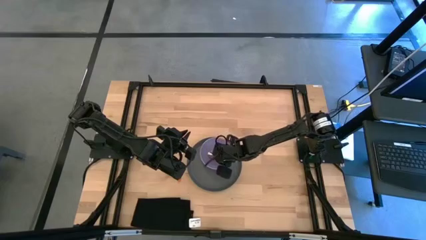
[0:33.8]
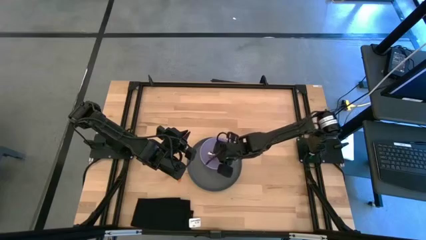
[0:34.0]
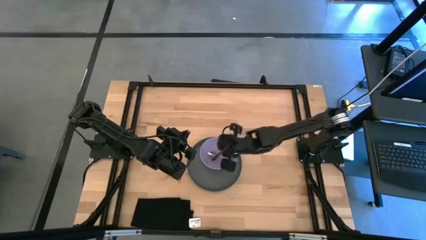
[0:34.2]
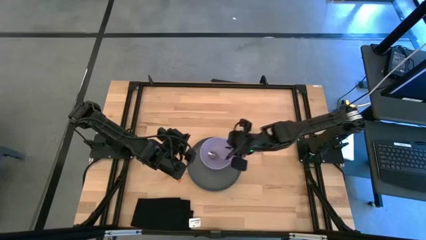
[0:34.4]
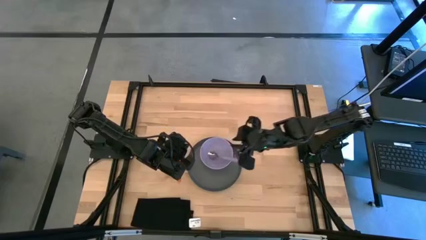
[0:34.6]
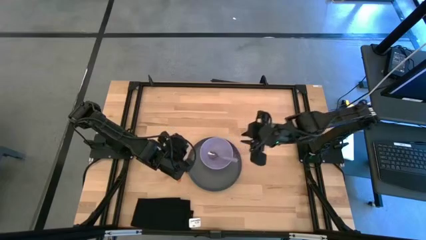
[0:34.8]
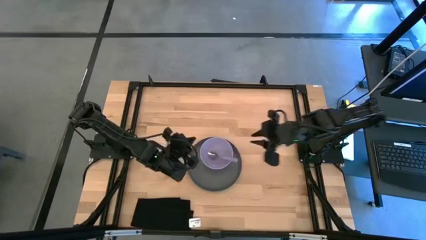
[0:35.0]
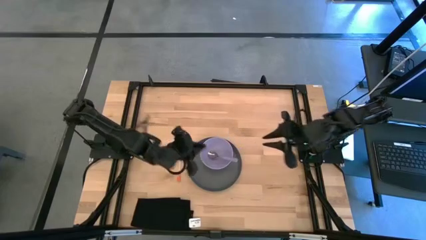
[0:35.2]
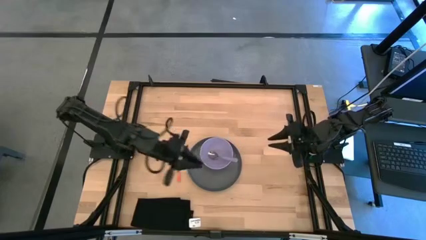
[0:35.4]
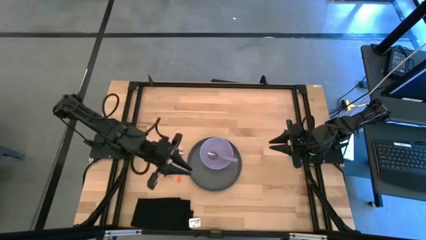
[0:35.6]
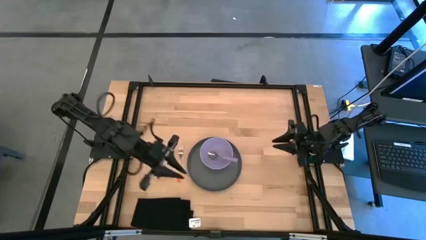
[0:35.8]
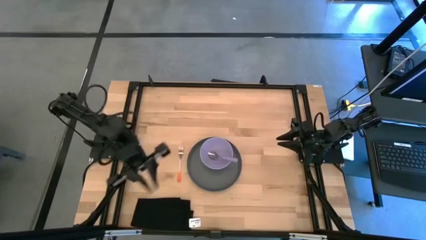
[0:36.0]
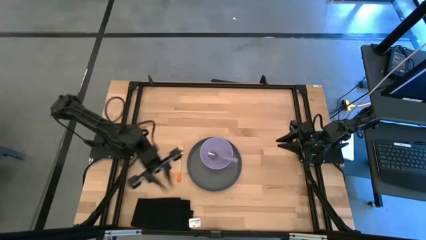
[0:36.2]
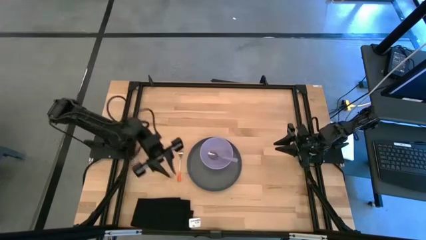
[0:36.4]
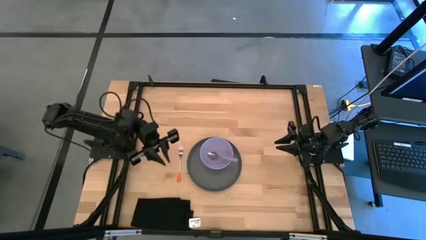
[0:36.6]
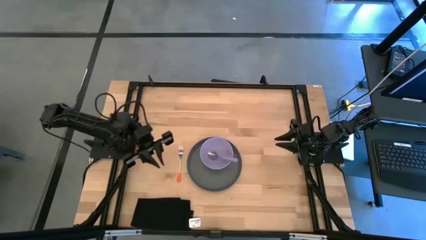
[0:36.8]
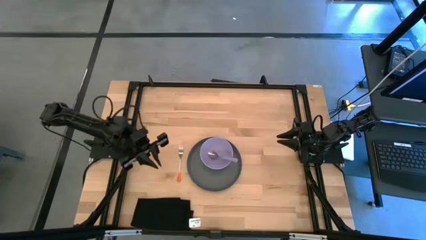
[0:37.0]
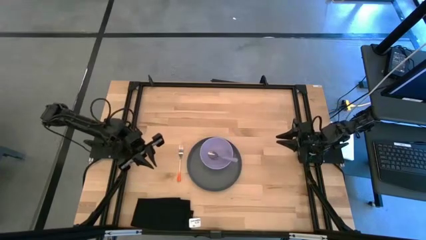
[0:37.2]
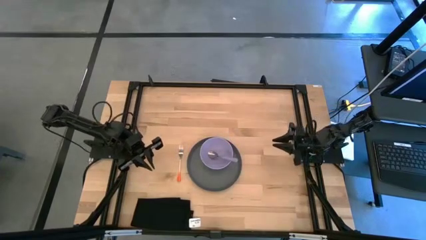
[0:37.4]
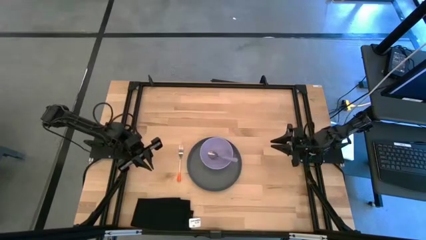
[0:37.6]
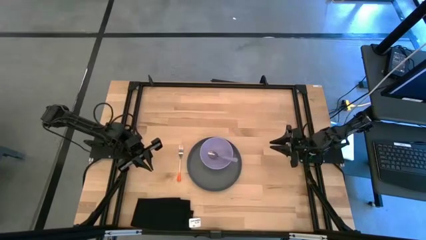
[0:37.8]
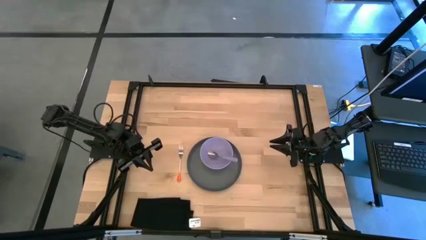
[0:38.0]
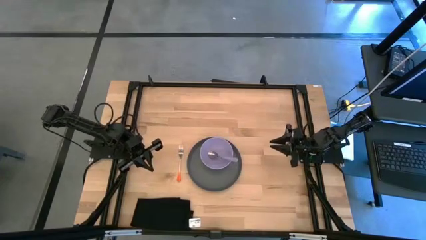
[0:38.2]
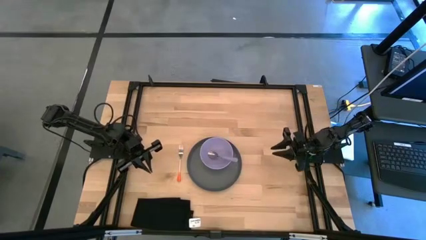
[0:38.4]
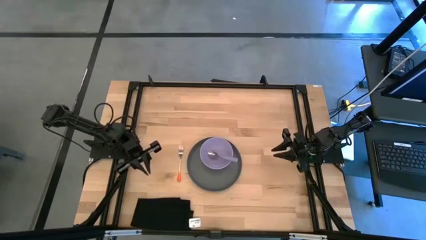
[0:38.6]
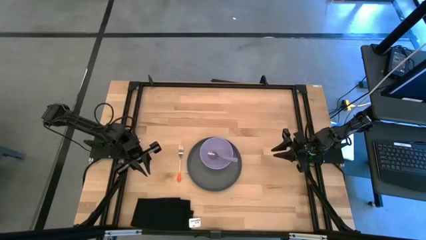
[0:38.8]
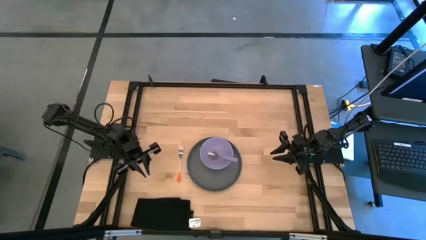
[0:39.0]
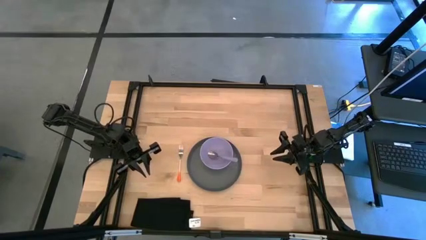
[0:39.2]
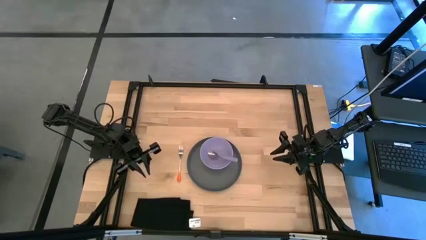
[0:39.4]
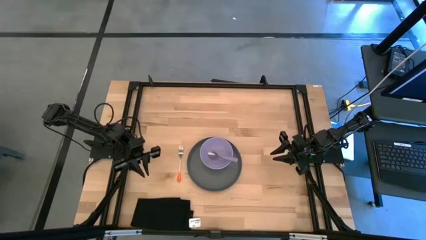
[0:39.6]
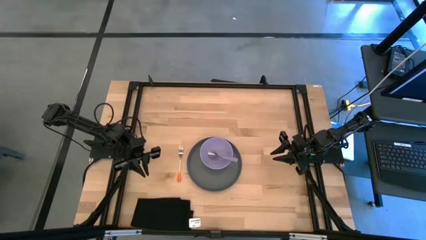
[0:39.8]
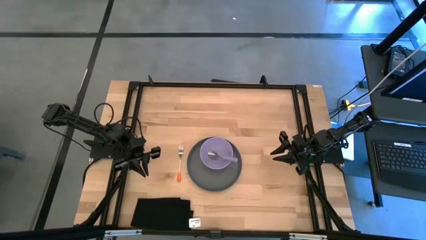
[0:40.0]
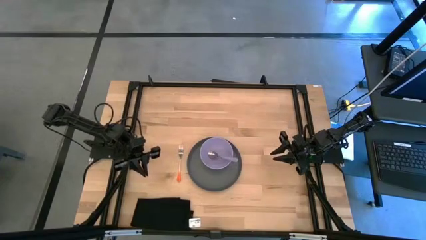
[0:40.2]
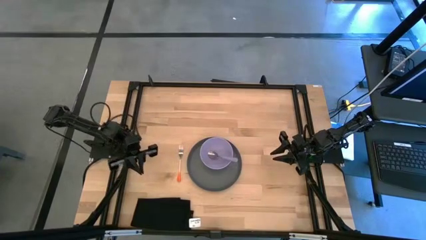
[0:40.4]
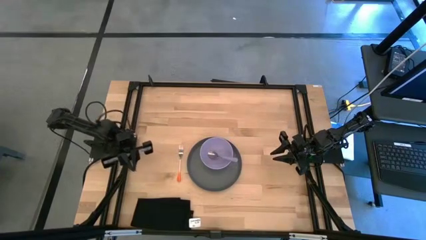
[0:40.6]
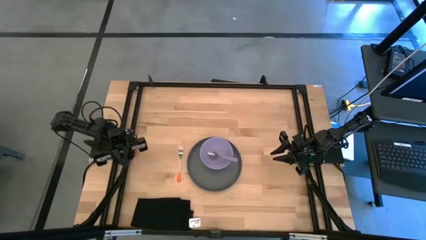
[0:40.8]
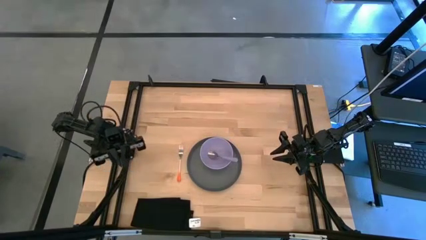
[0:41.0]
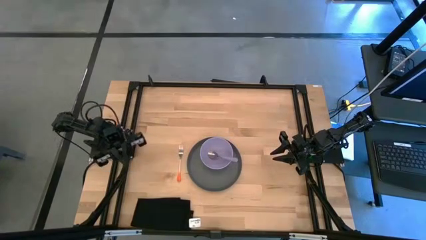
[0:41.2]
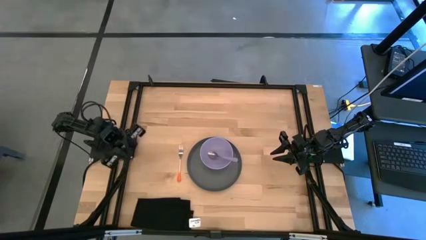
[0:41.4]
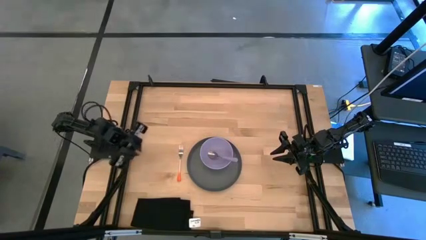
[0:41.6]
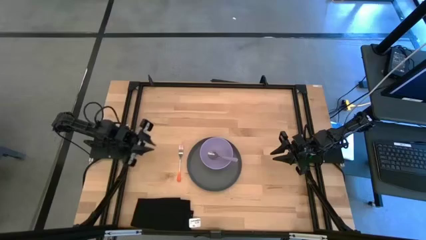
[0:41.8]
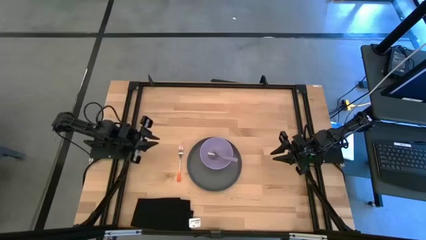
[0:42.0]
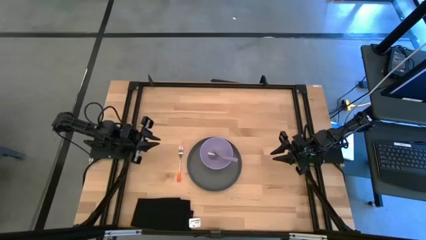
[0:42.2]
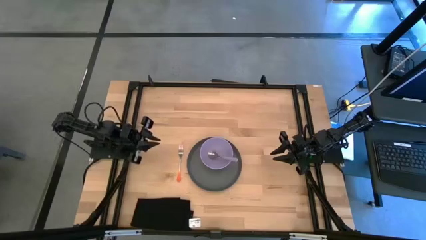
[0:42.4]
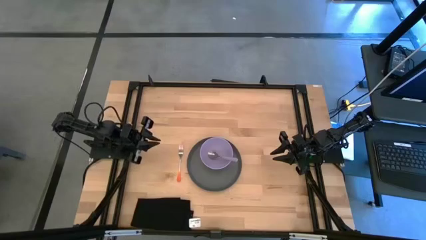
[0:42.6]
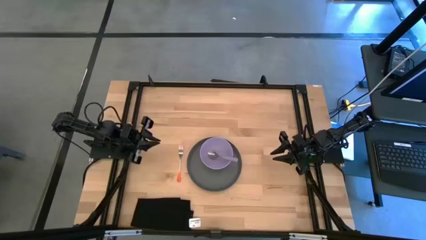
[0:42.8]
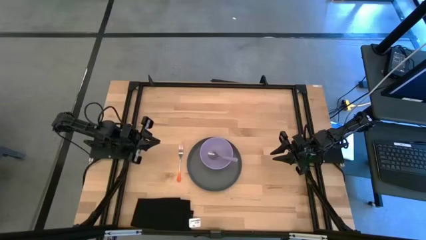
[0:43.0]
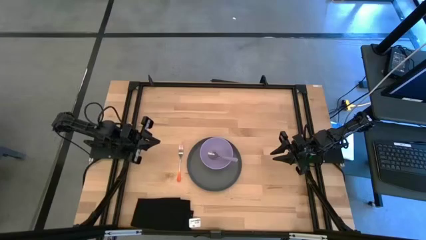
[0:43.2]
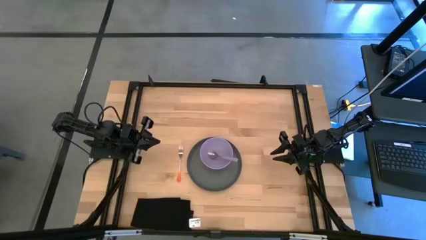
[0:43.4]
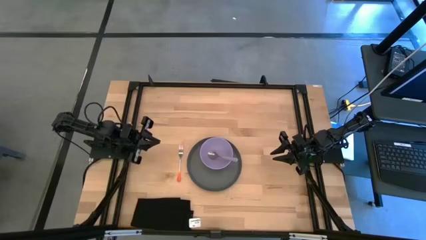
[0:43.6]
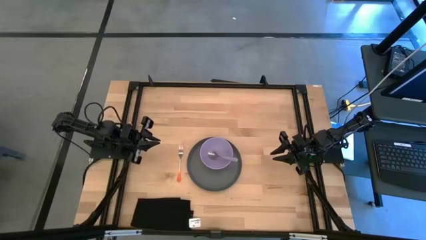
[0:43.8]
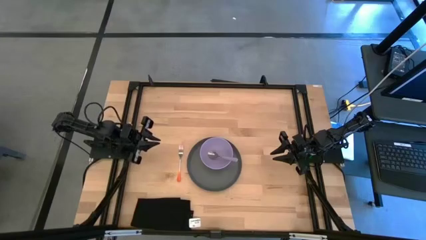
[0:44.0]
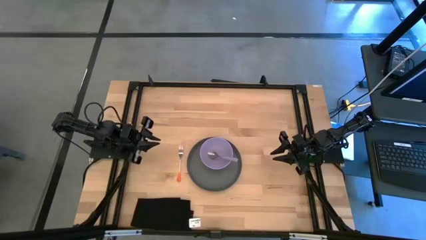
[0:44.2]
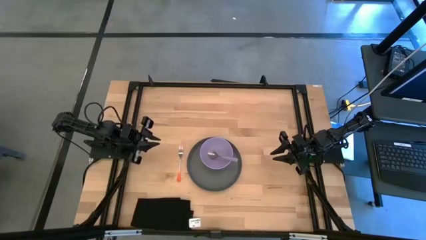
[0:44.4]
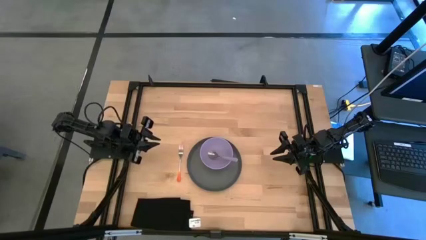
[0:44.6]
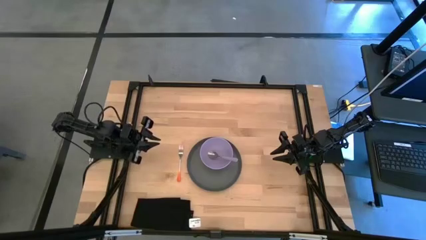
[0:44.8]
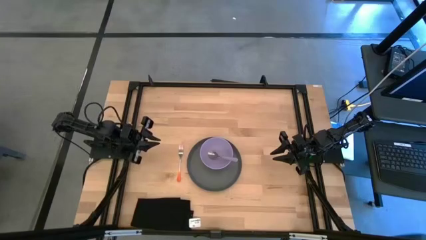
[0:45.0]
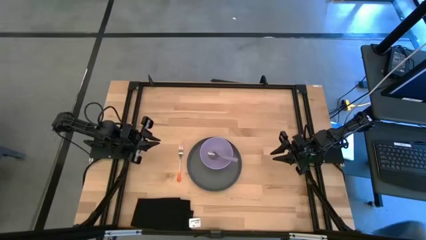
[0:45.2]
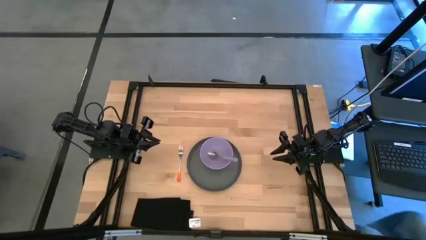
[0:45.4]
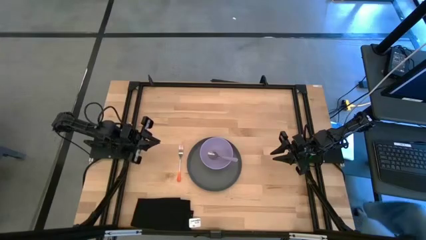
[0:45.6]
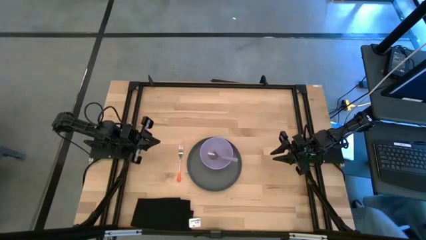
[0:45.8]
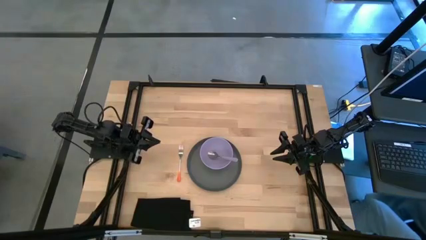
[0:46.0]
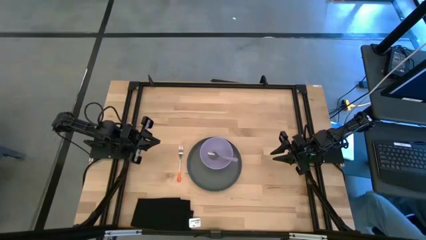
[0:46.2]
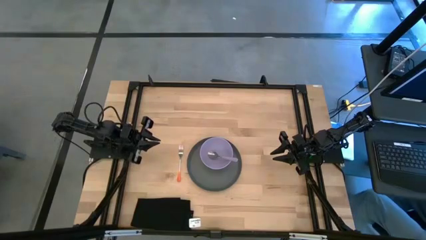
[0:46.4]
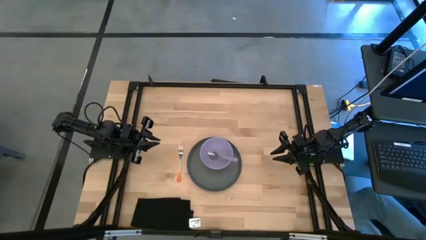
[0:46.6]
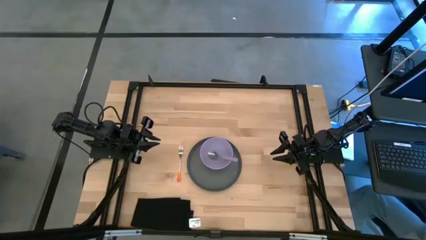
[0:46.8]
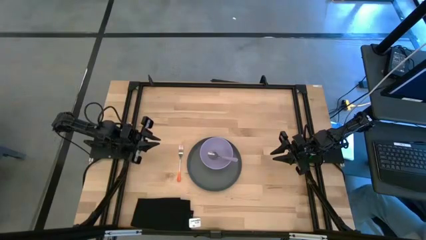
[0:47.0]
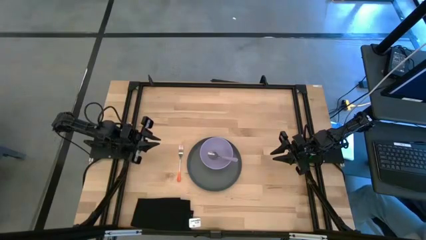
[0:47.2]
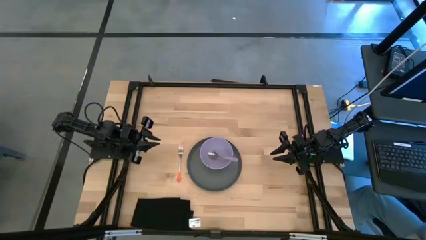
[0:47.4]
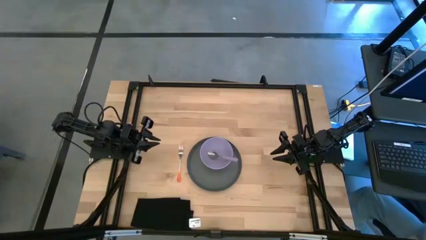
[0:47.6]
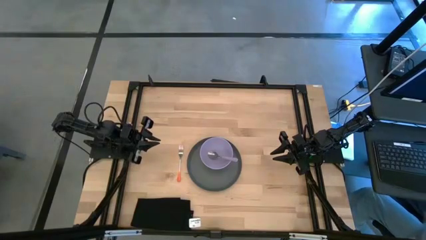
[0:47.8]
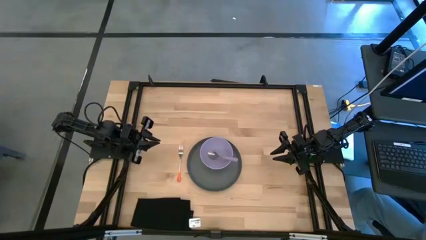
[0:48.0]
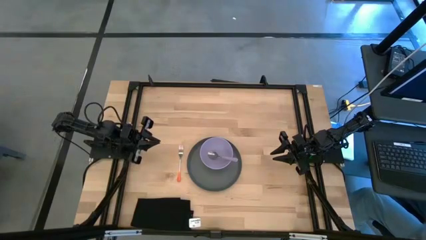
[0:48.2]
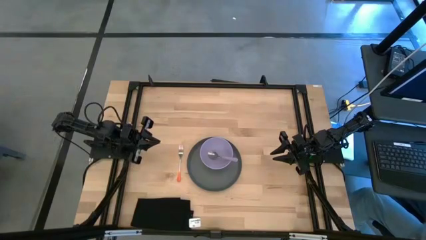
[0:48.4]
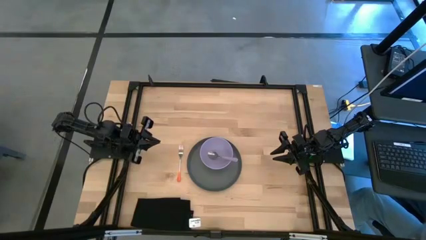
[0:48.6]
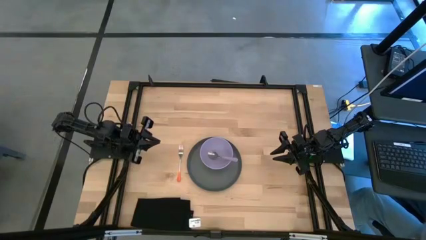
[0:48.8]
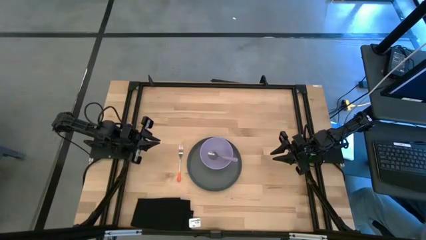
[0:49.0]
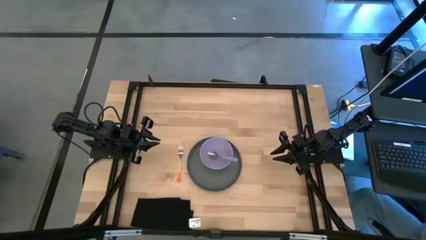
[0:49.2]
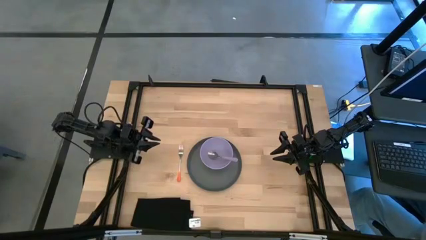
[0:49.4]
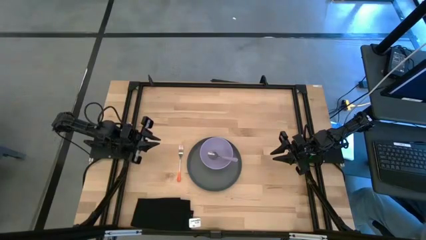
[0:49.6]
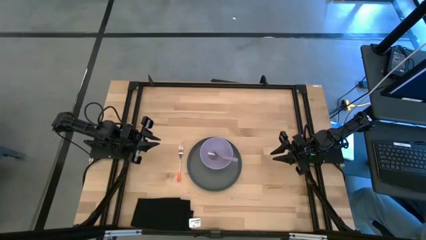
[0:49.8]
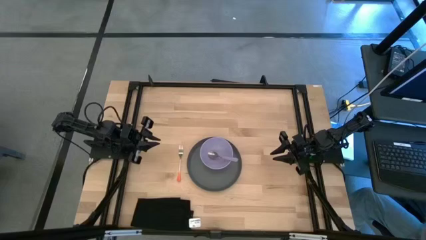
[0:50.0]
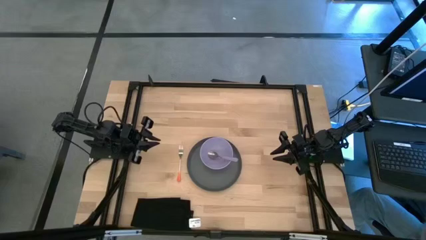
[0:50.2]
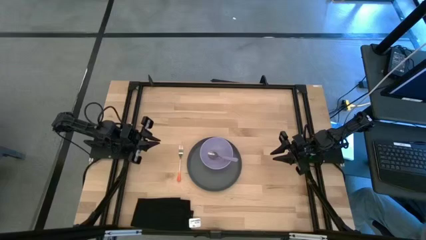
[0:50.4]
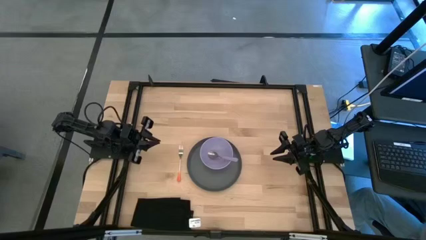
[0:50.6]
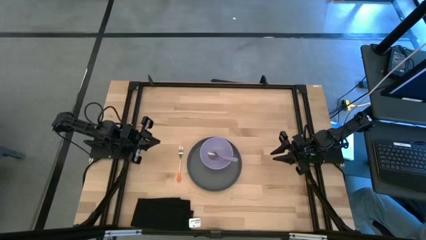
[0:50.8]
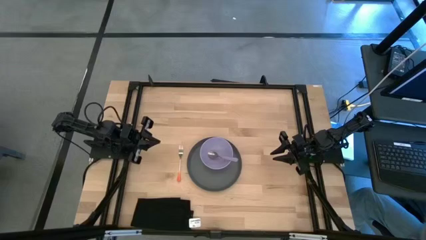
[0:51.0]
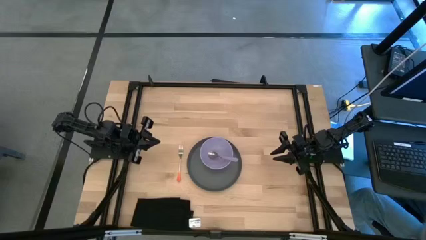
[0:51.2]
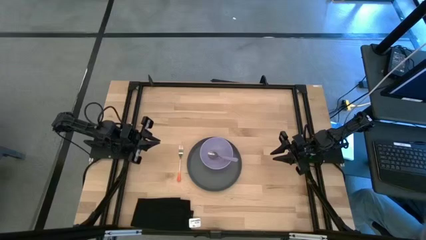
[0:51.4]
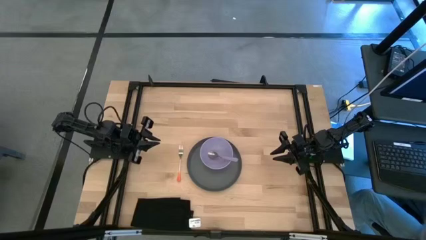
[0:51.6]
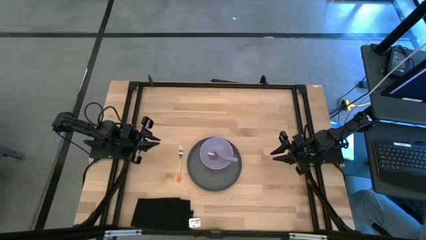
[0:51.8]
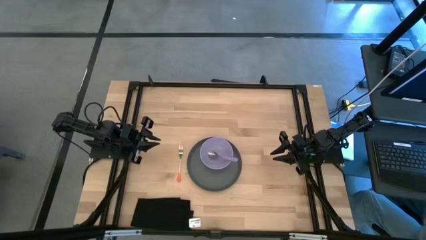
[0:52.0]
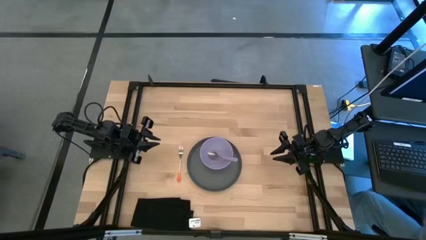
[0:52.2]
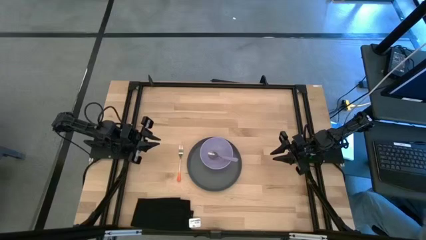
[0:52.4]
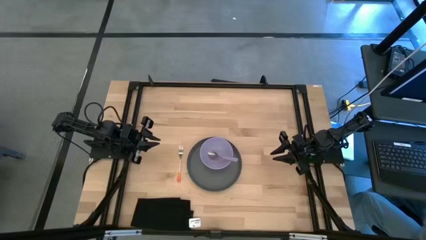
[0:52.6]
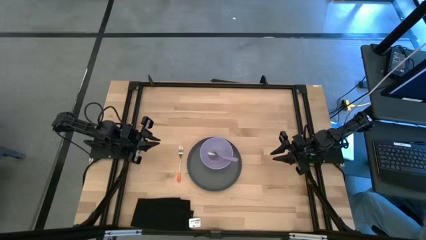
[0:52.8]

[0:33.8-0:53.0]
Task: Set table place
Return to Home Position
